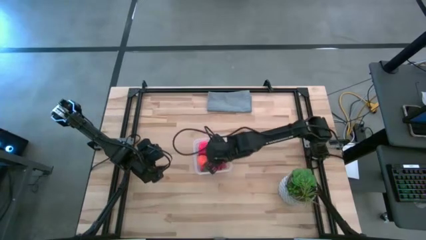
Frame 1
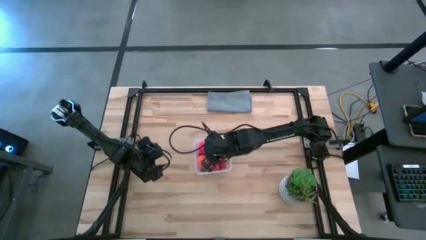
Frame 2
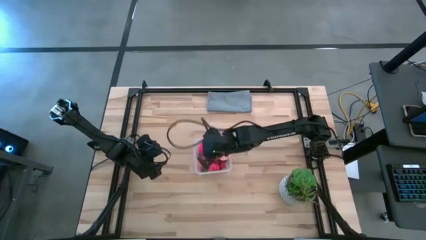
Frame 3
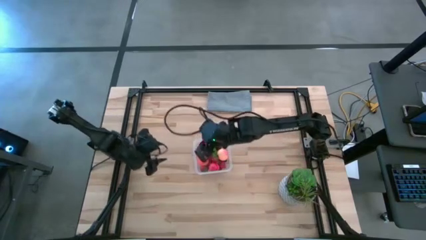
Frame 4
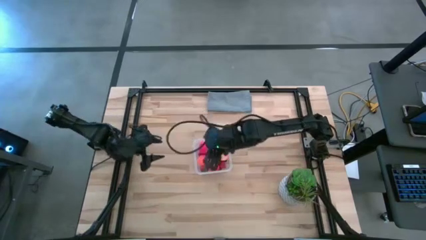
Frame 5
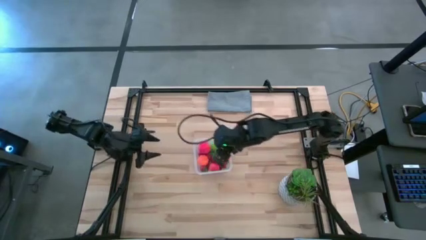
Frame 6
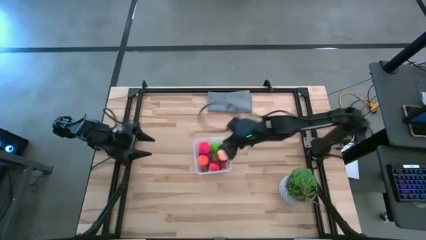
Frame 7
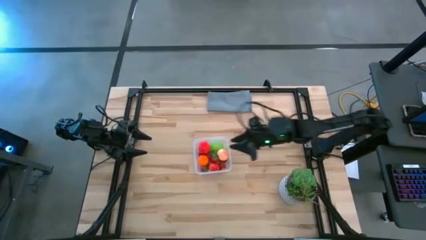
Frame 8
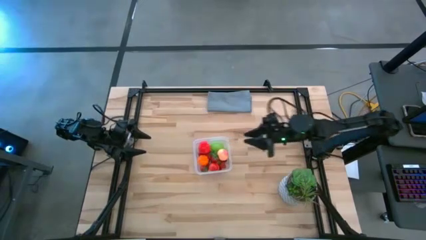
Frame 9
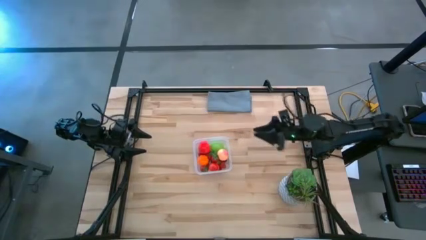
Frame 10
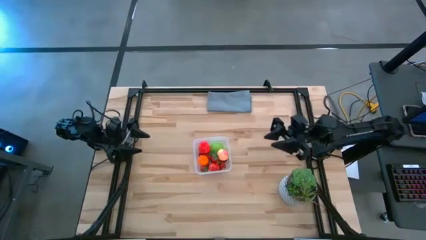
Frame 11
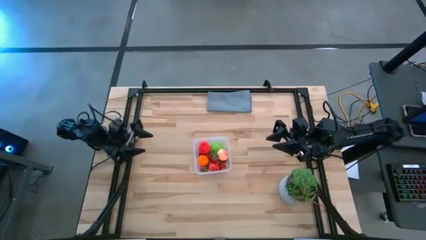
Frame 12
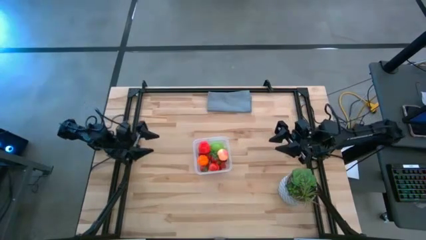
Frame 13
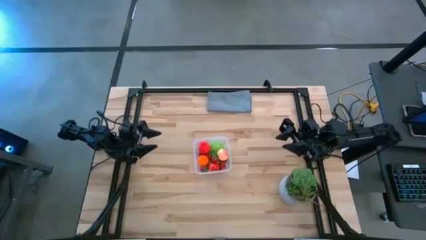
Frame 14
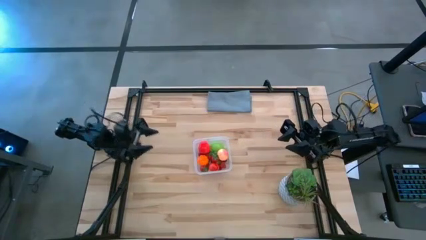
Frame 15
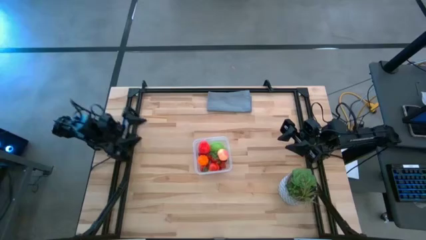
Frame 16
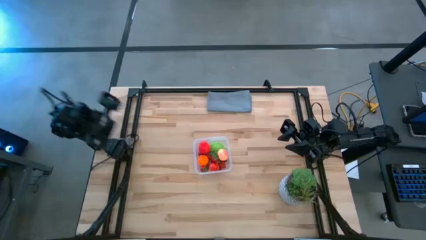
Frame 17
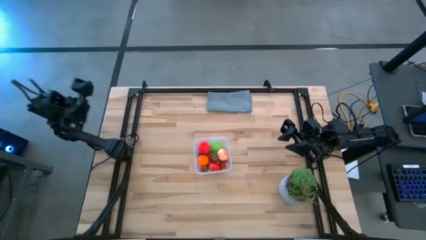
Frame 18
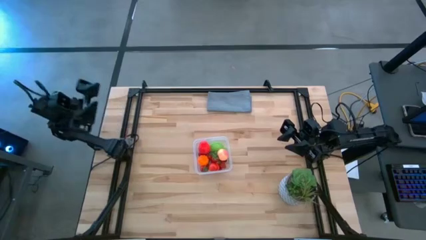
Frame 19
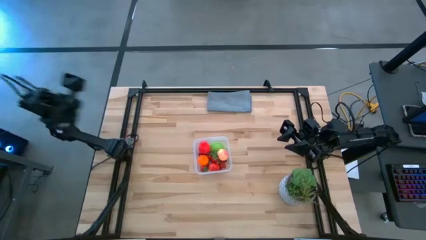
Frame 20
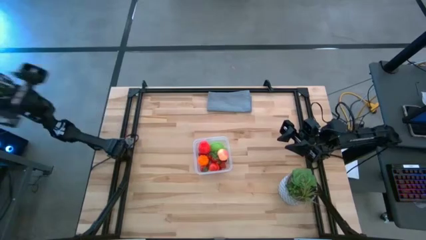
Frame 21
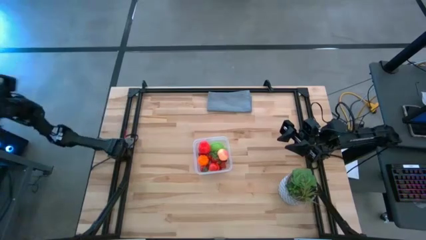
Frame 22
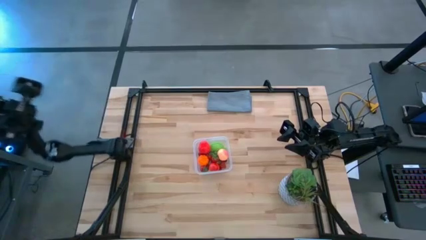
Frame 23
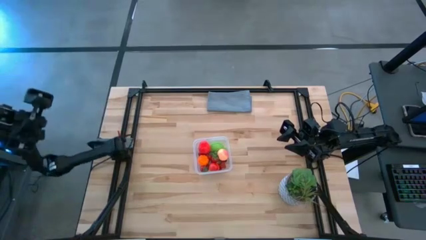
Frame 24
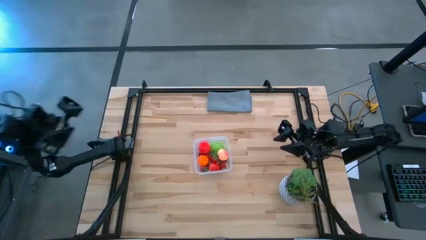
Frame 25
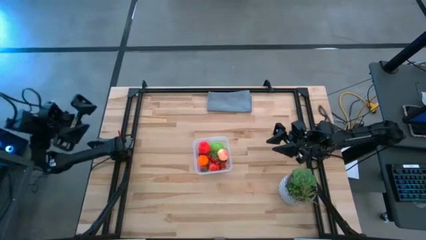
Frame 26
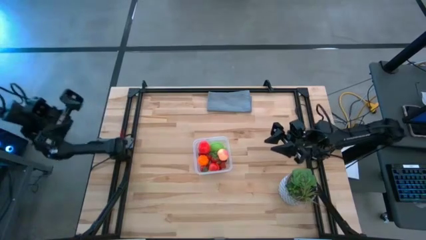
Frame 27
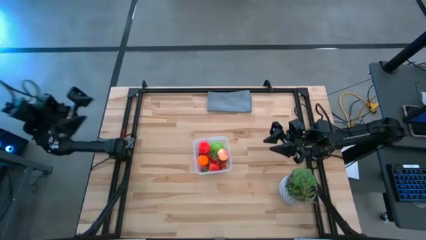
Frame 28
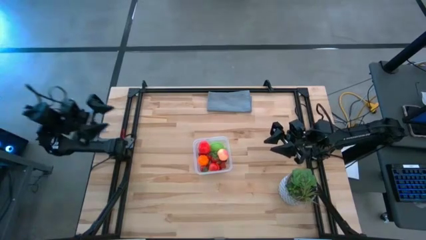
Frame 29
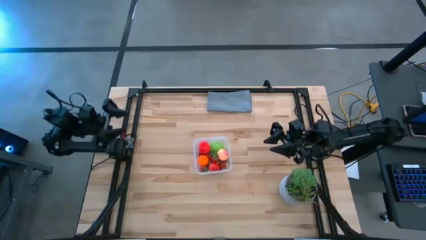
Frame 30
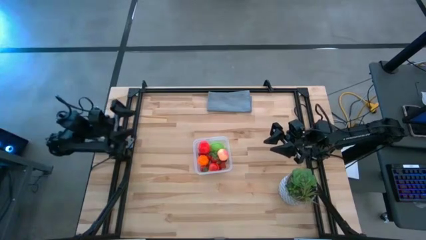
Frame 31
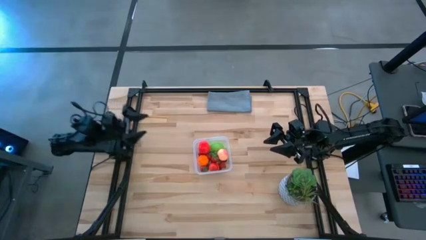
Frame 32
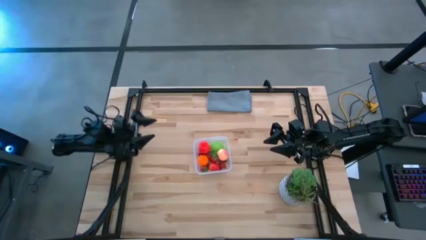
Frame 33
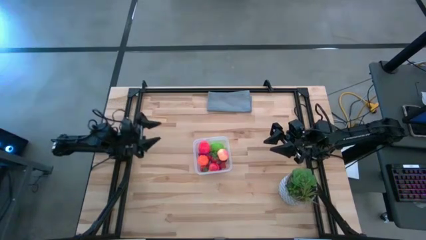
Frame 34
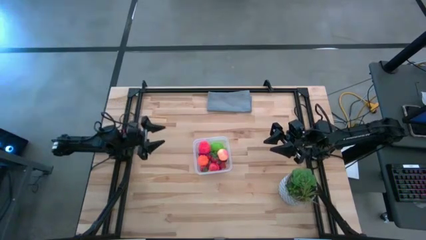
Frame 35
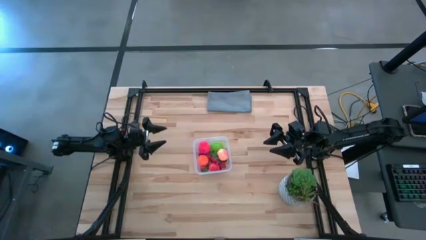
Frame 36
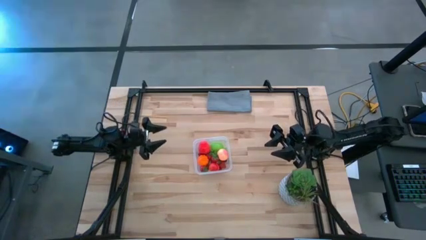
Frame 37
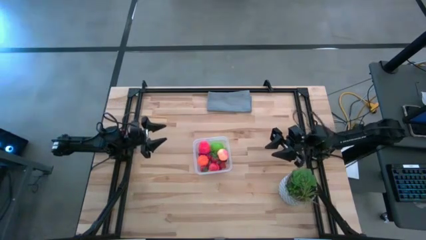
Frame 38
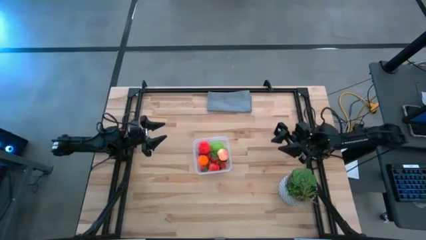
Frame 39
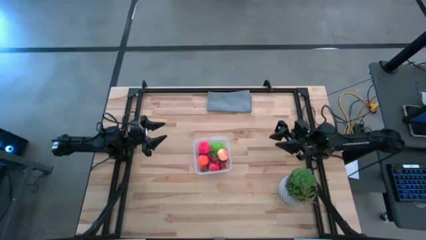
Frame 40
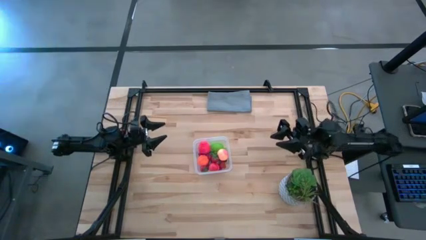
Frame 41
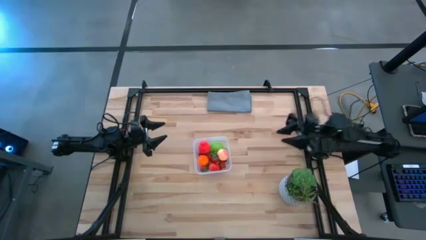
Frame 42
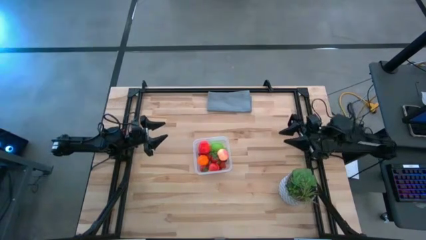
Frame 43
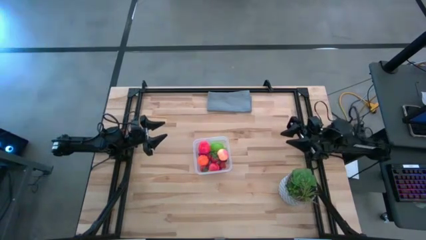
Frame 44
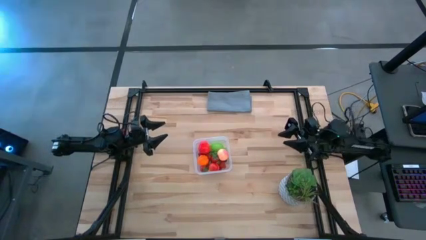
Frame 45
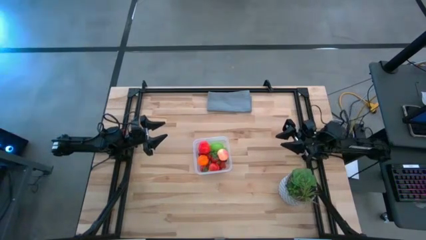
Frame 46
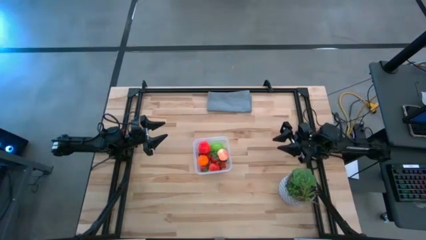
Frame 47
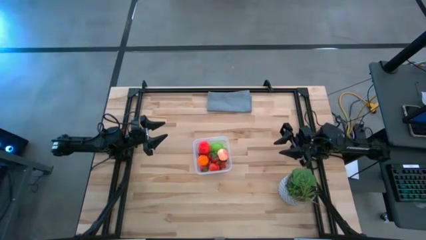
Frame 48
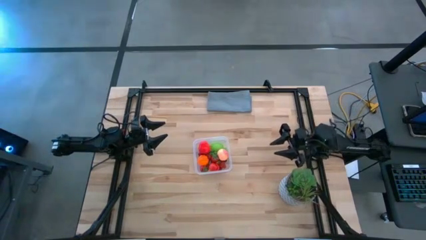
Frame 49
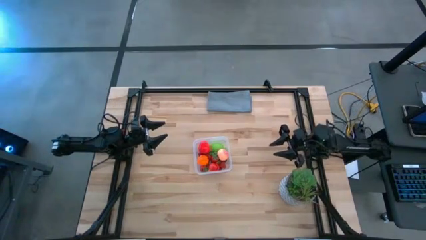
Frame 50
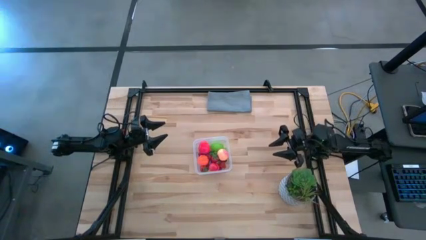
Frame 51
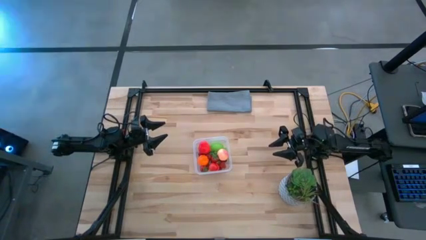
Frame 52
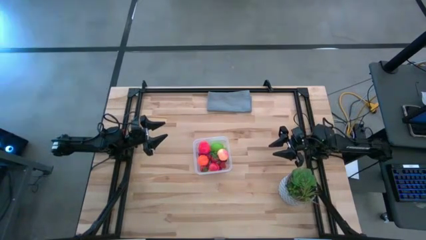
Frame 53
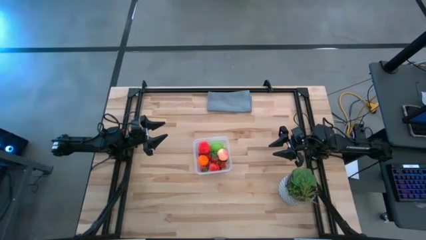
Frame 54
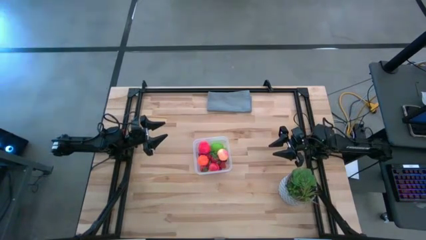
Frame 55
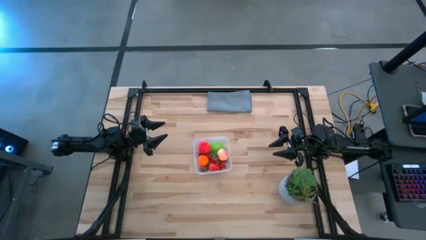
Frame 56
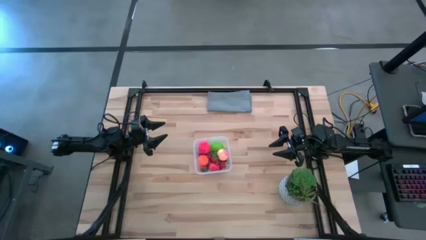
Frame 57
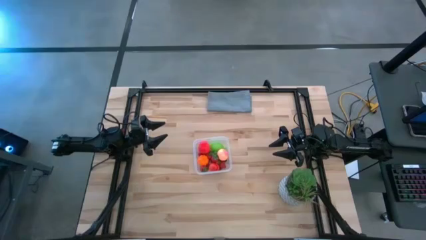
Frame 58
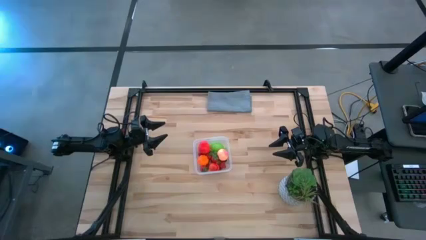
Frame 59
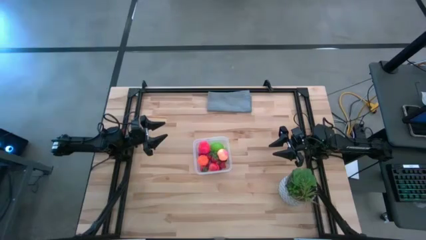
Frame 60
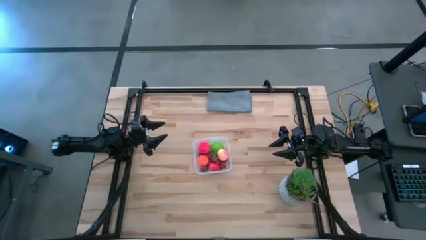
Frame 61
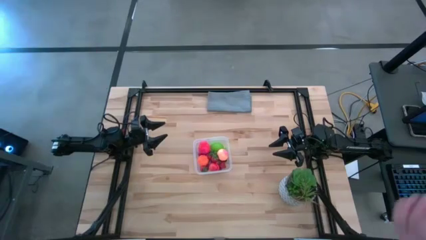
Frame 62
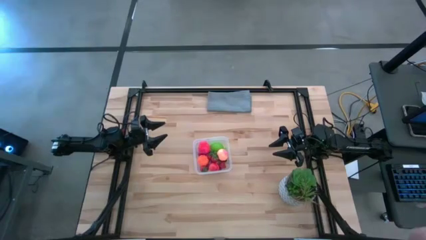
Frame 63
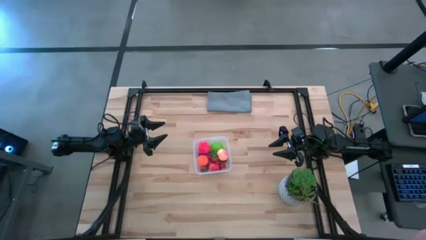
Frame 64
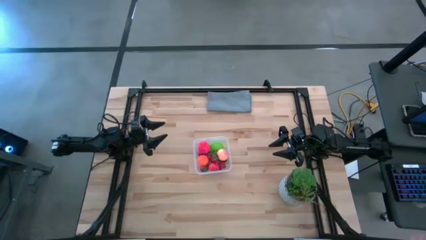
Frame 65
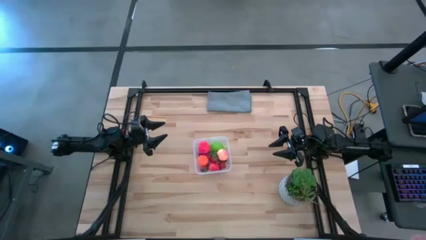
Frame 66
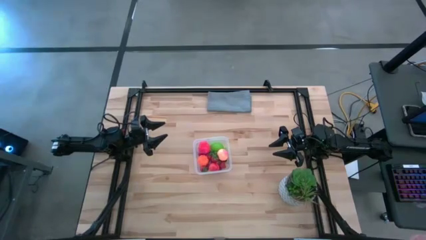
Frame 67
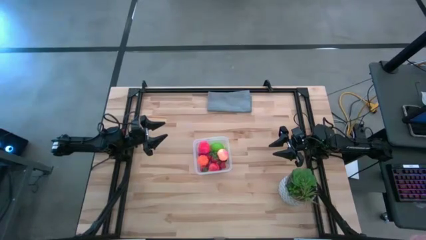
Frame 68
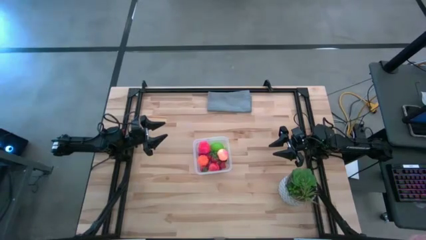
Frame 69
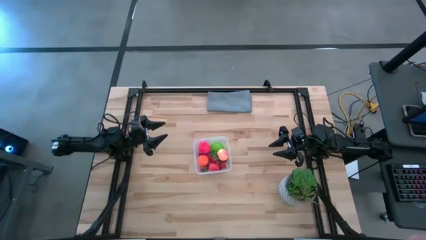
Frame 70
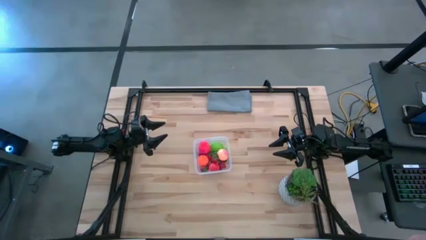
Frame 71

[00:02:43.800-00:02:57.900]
Task: Pick and placing Produce into tupperware
Return to Home Position

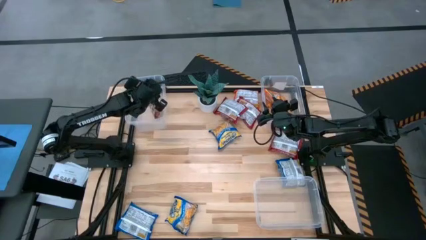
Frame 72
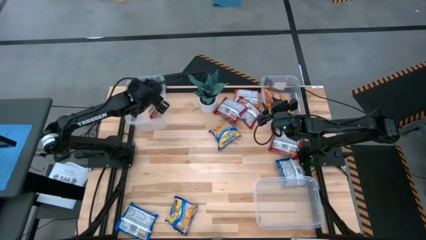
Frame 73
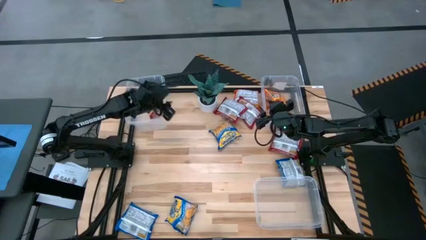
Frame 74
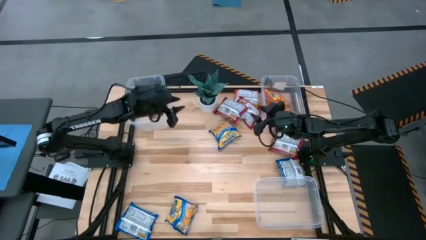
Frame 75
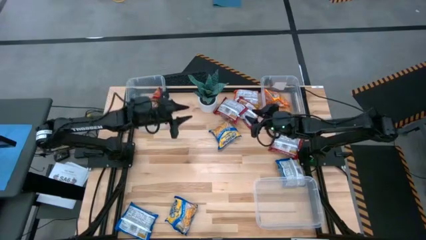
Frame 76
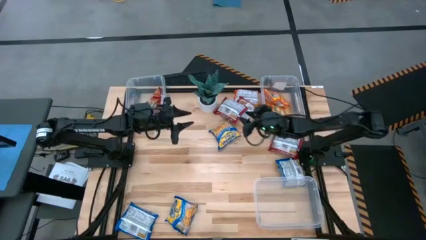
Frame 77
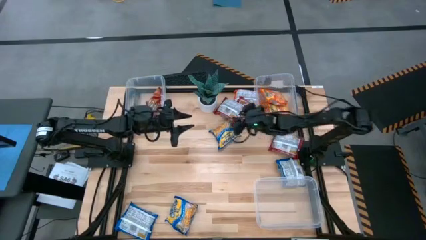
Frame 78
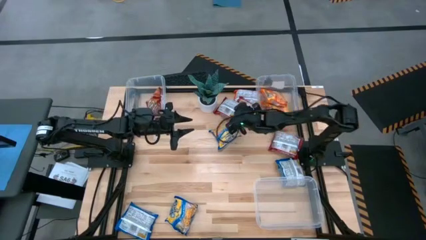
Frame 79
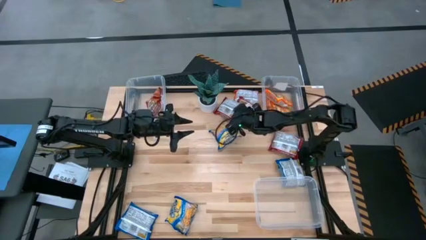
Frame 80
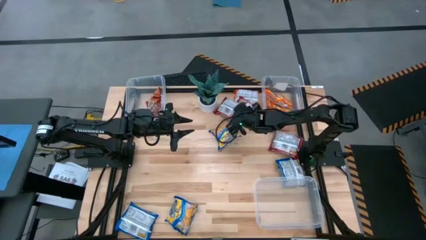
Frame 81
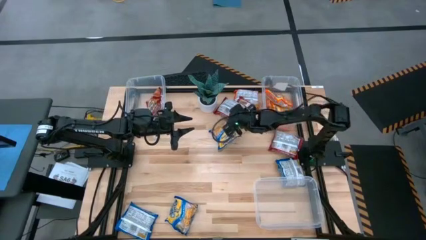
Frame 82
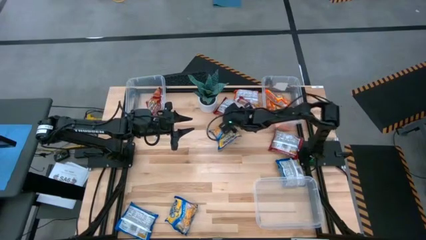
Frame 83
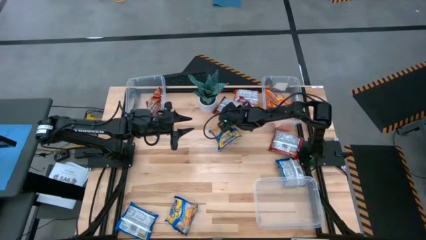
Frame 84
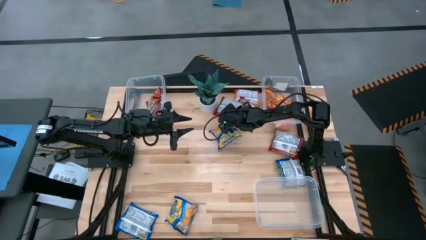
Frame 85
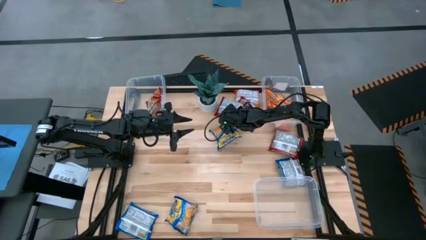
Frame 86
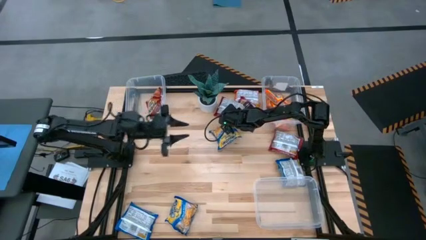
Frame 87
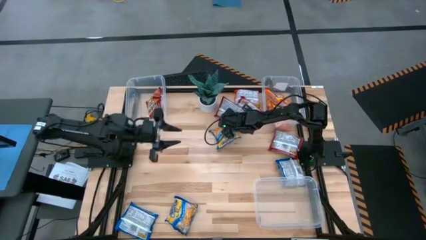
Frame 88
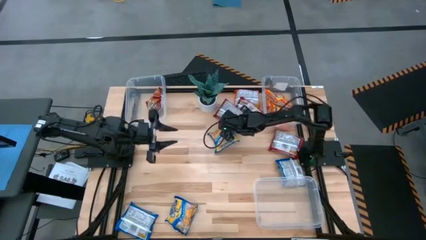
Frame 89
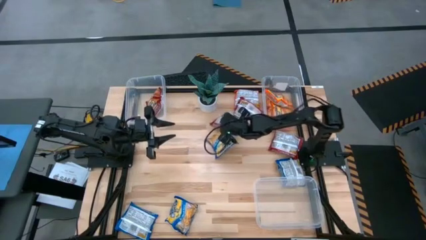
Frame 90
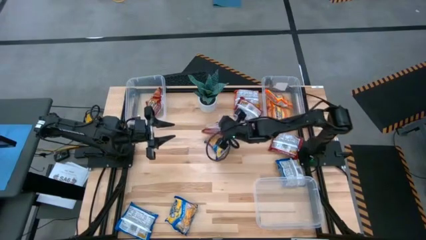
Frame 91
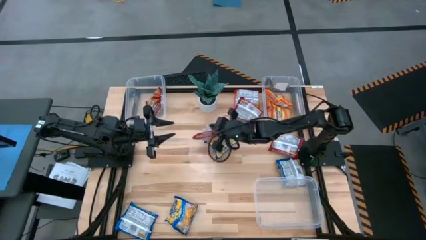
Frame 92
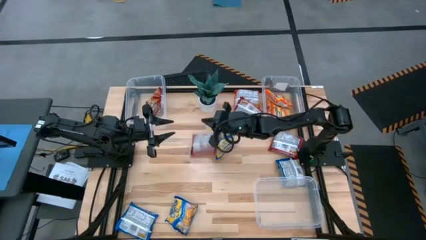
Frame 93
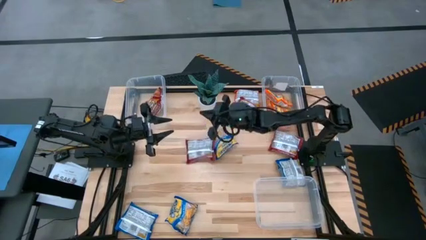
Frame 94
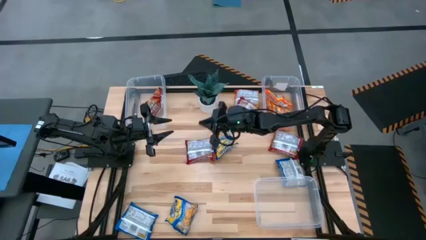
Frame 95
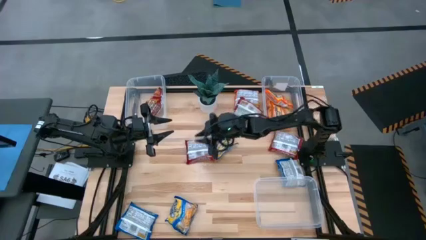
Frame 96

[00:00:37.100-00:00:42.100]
Task: Sort Maruchan noodles
Put the red noodle pack in the top left transparent bin
